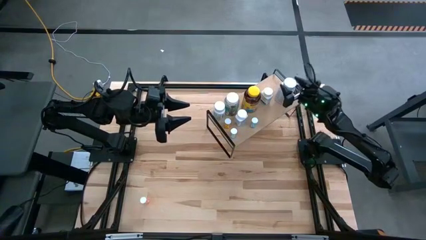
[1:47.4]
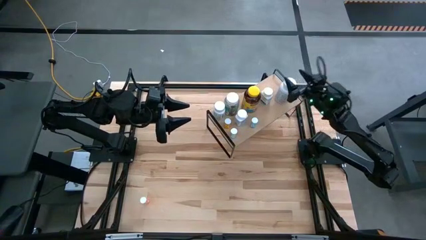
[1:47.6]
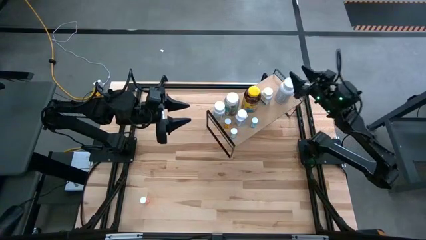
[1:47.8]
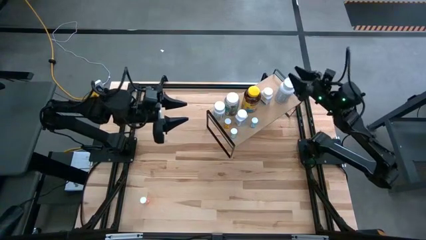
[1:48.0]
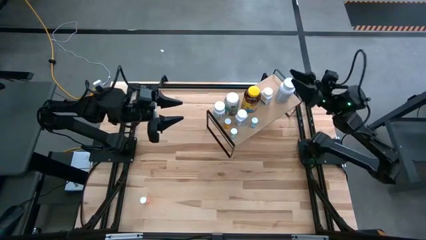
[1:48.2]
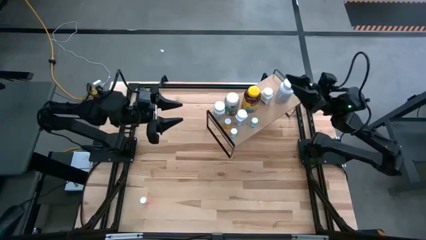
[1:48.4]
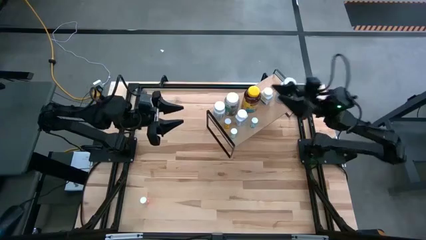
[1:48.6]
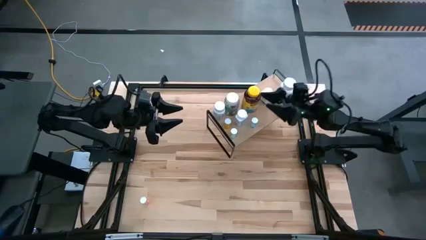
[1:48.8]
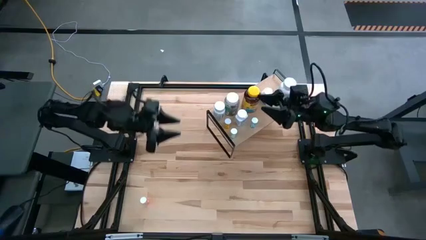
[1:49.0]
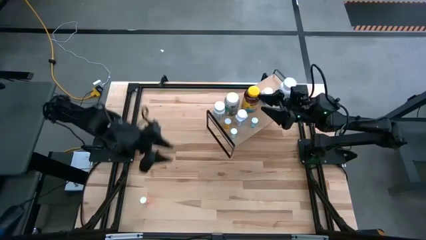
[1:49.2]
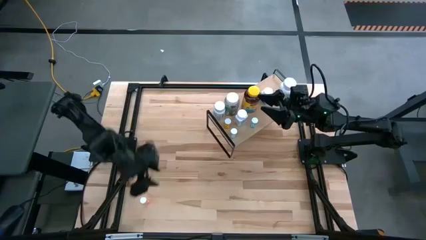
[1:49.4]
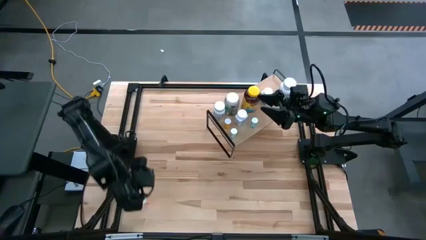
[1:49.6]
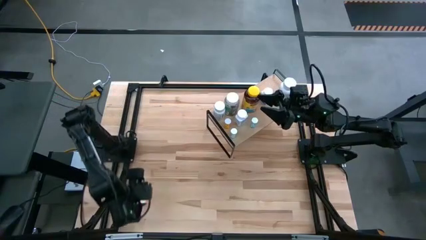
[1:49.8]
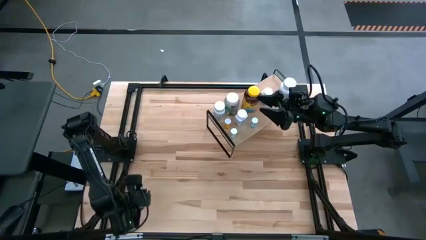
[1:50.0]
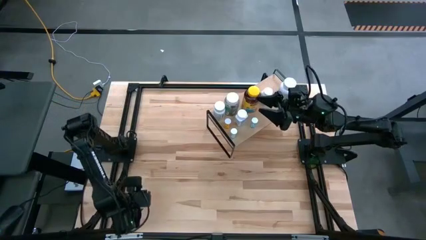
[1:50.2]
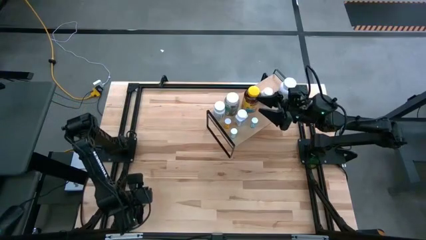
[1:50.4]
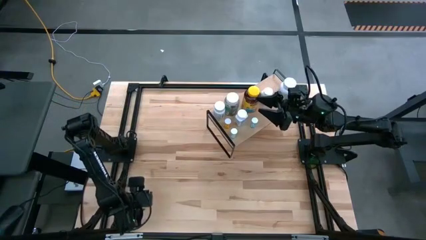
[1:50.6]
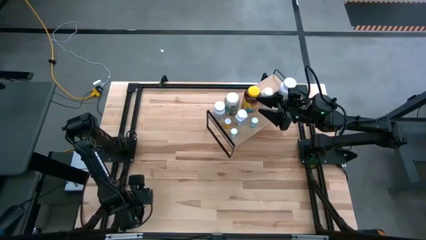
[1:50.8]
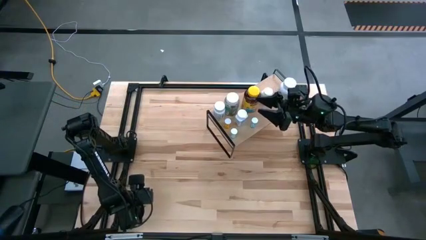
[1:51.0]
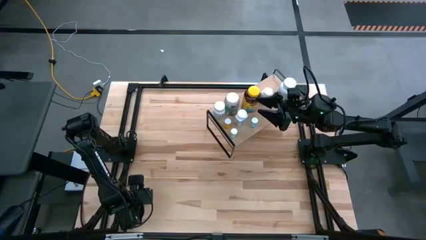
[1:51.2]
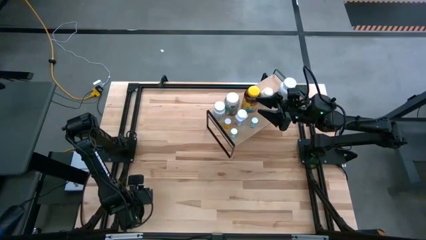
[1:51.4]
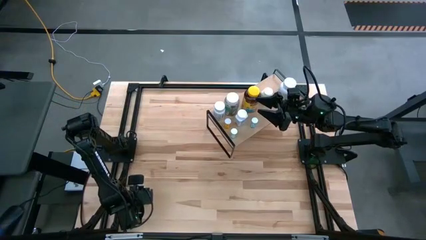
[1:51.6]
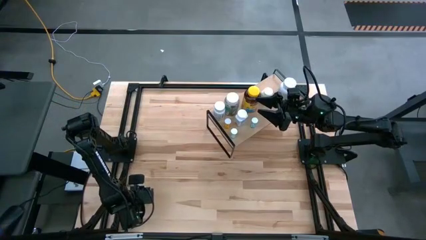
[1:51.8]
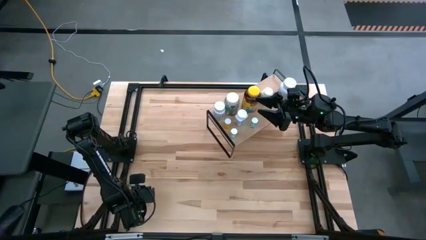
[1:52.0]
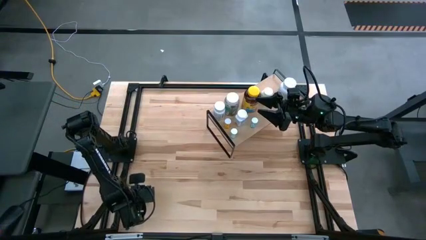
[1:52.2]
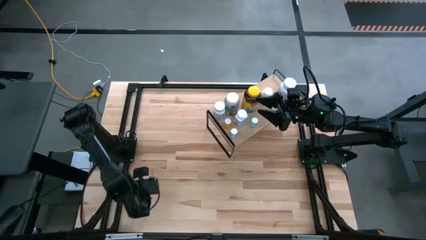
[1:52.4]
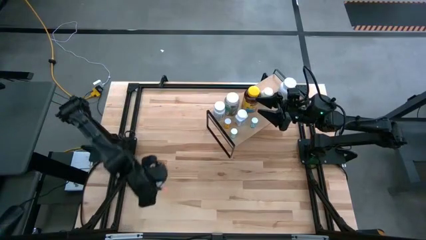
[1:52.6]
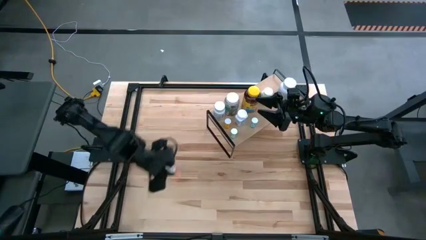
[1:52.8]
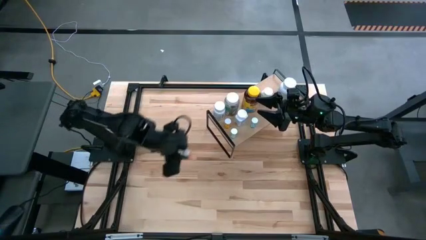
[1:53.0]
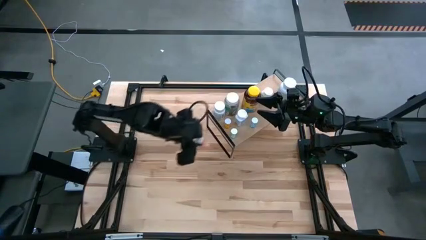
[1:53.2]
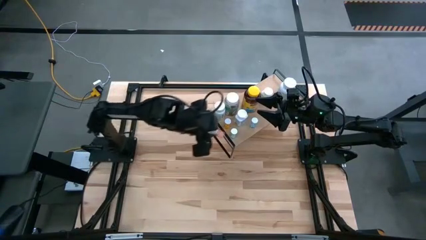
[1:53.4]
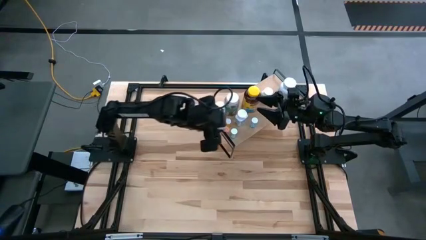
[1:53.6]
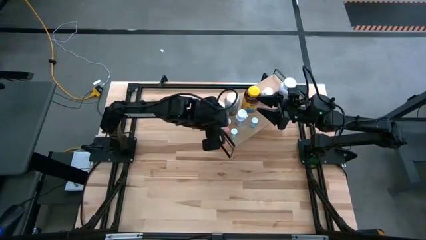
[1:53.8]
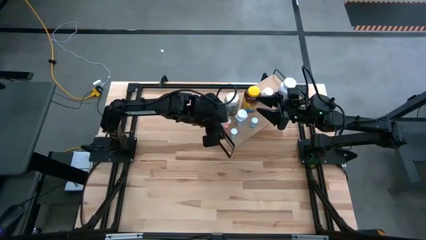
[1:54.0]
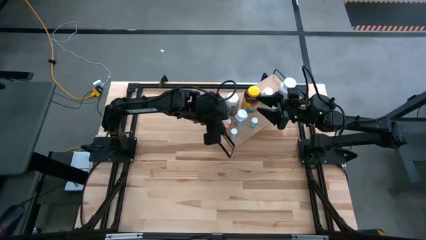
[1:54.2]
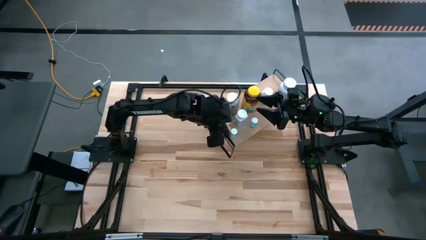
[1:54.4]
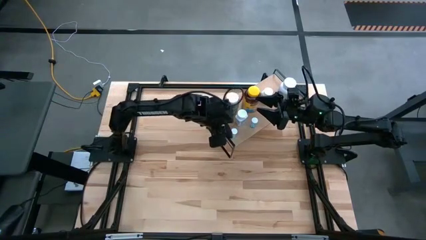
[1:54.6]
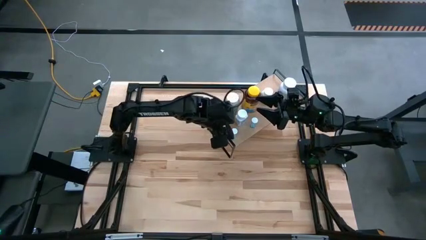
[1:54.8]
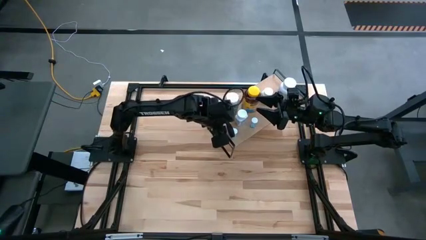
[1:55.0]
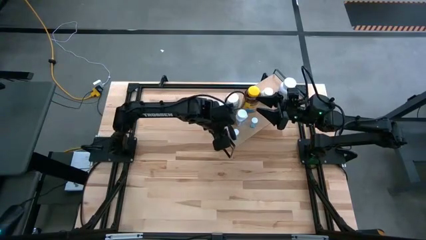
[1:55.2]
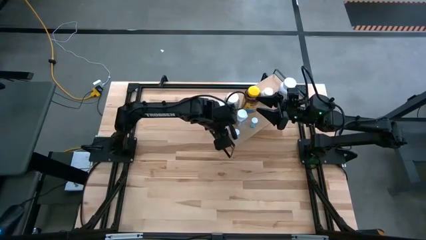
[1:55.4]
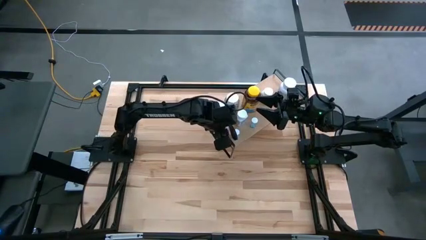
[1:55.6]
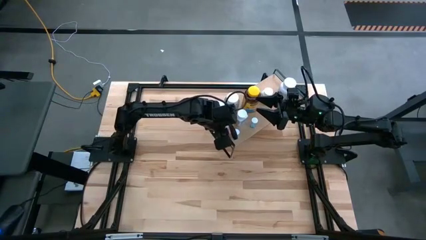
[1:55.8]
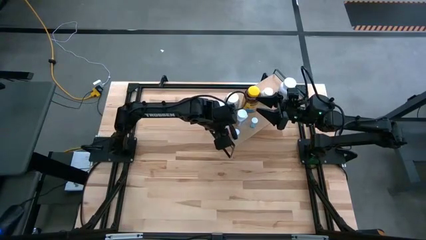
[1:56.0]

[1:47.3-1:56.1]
Task: Pick and place medicine bottles onto shelf by color
Put the pink pill bottle on the shelf

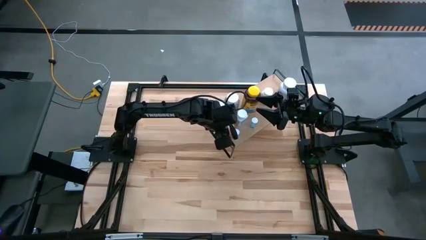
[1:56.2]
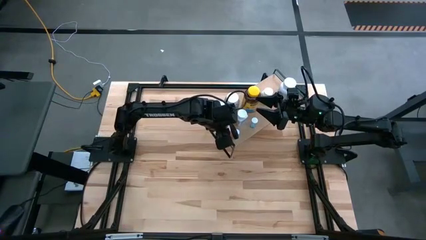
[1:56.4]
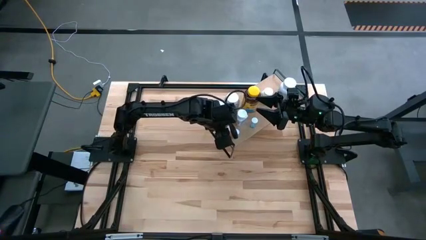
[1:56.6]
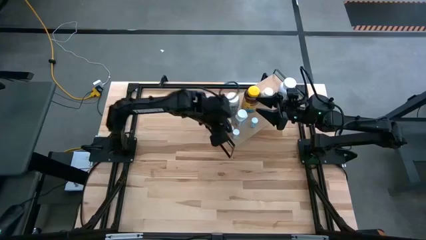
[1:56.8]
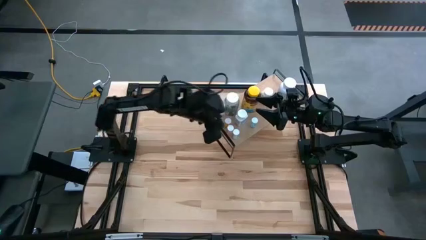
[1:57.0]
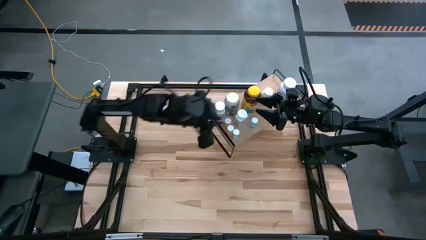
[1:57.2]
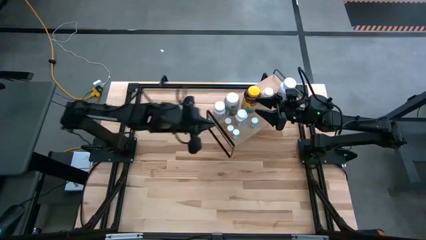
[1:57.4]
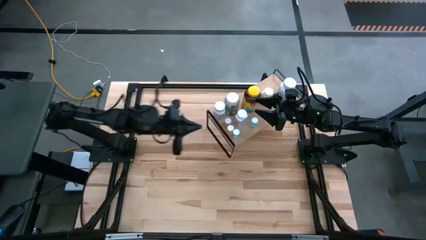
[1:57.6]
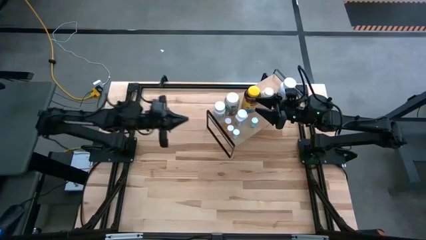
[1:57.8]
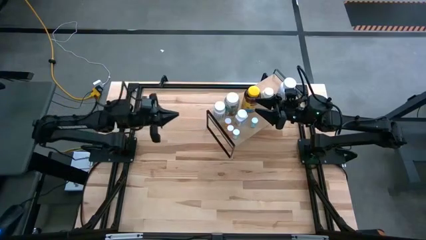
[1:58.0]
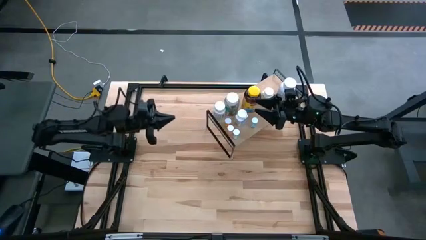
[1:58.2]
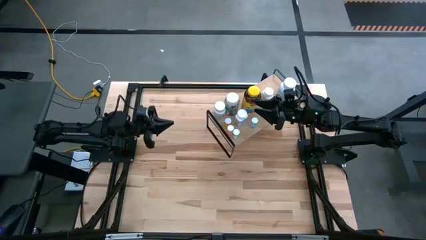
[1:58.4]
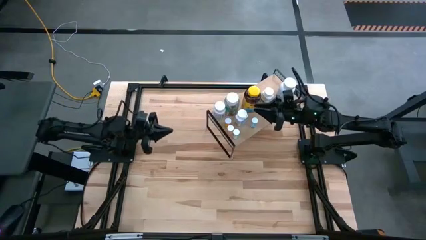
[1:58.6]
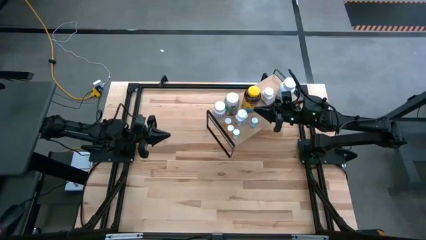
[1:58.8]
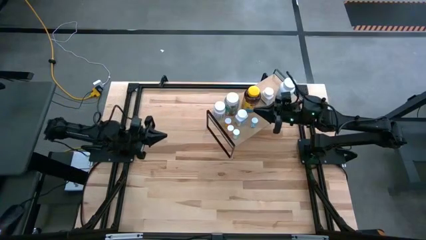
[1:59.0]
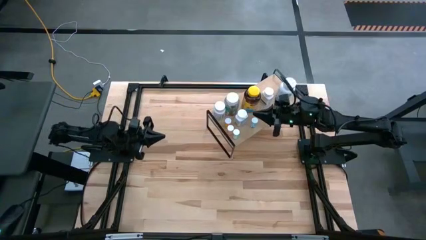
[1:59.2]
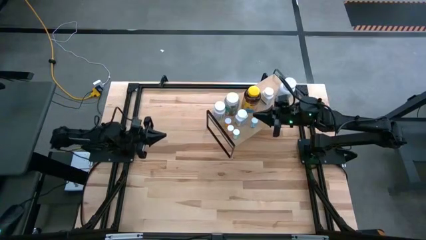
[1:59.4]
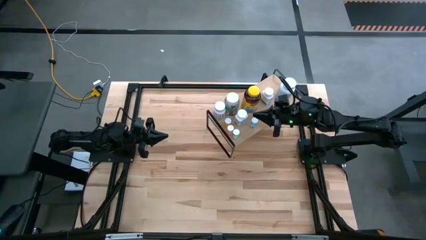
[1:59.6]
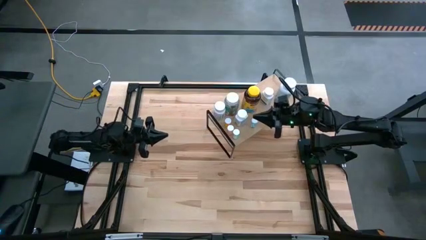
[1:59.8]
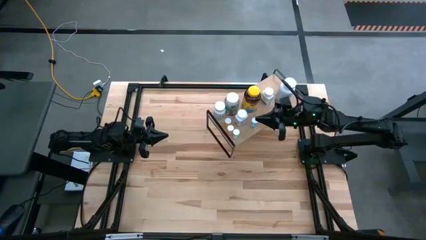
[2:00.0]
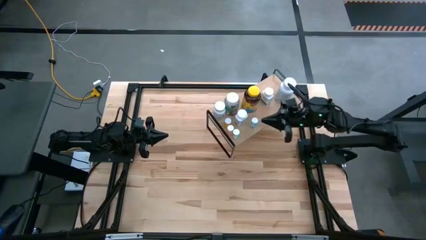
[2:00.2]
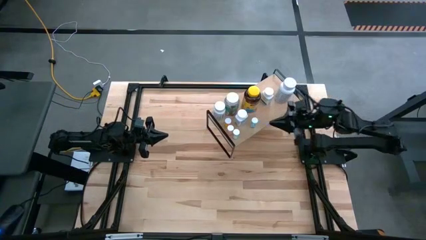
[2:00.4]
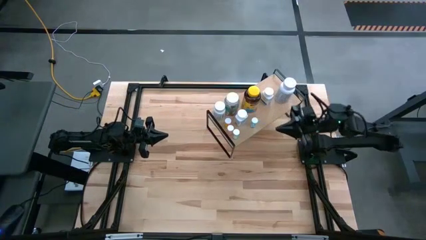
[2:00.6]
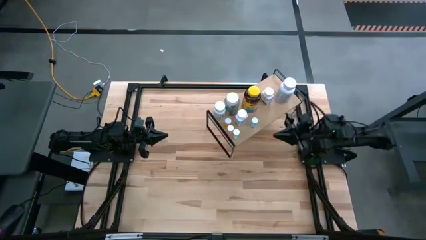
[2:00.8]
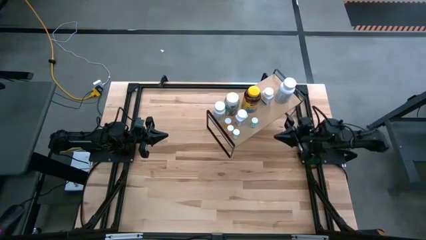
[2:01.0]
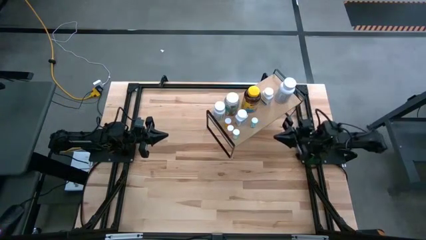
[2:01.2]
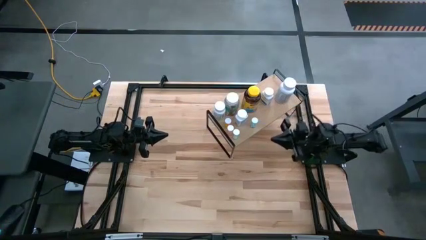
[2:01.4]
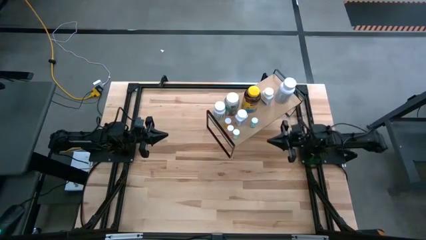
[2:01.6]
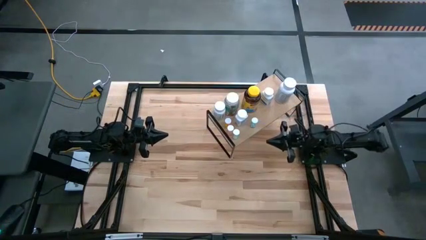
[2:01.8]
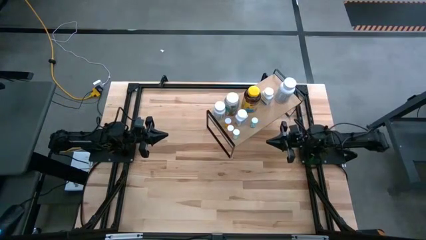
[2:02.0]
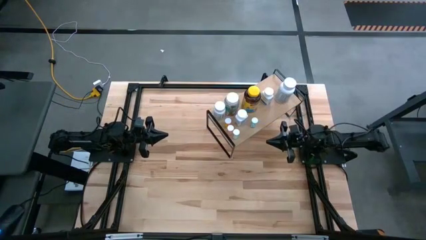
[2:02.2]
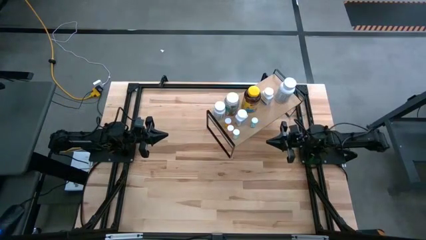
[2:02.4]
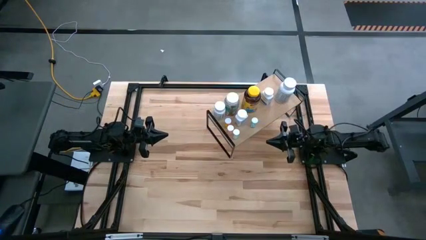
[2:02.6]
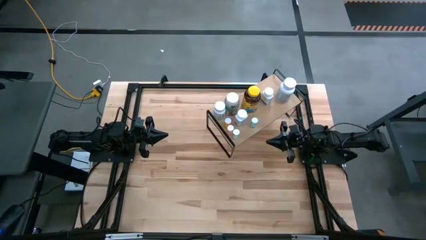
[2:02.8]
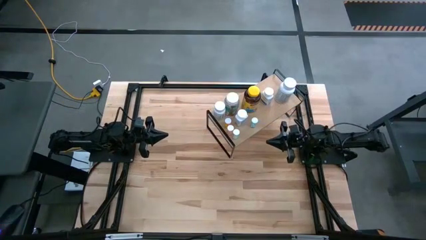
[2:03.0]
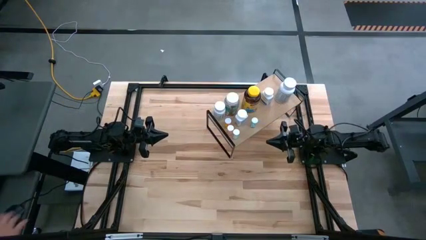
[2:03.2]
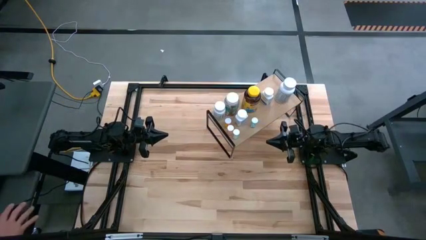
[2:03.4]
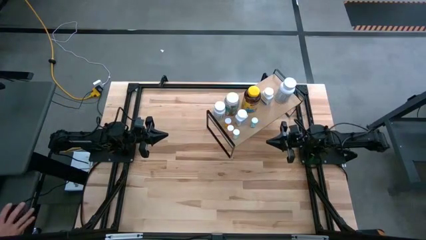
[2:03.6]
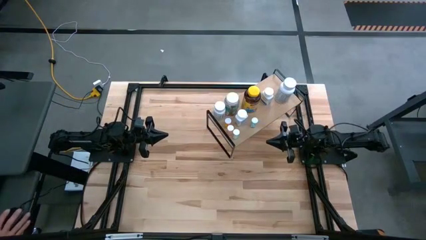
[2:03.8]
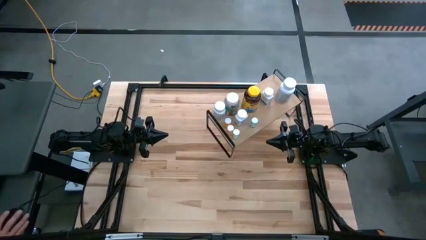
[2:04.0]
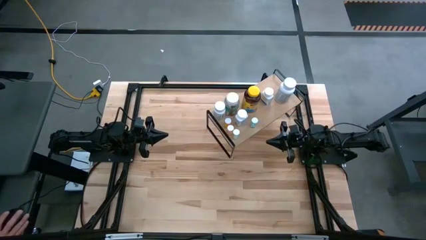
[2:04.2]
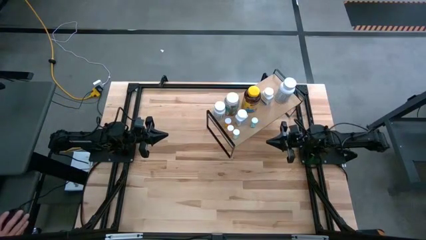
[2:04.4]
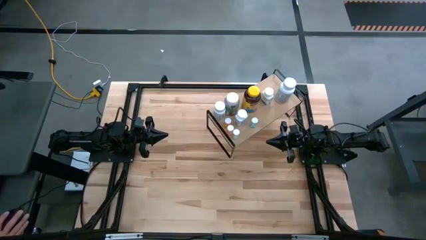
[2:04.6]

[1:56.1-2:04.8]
Return to Home Position
